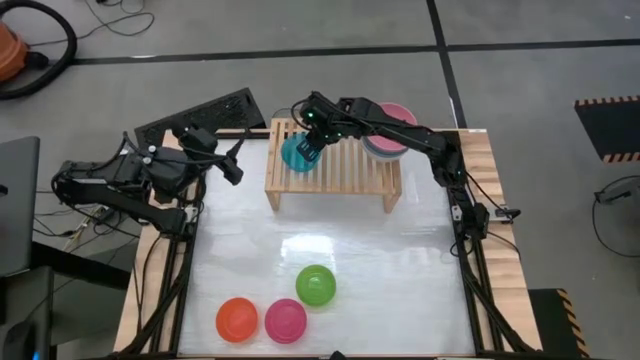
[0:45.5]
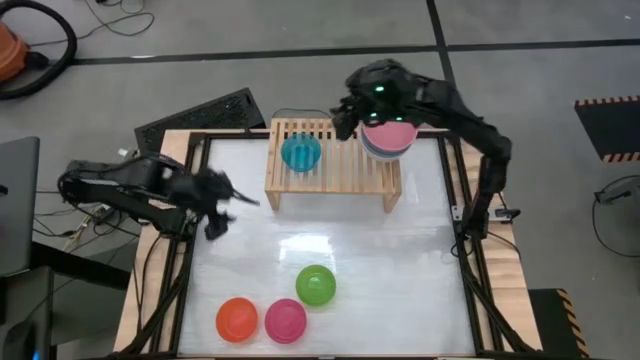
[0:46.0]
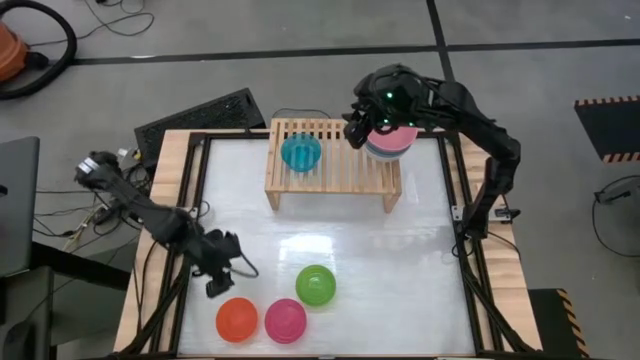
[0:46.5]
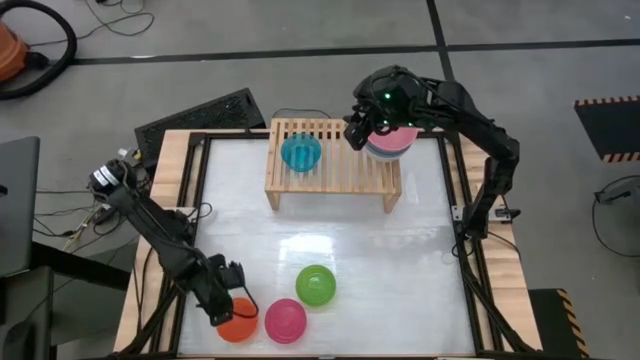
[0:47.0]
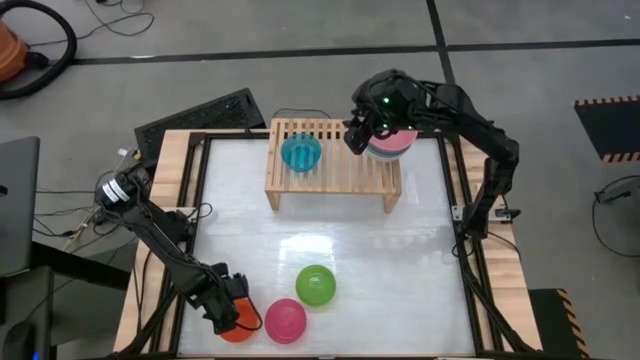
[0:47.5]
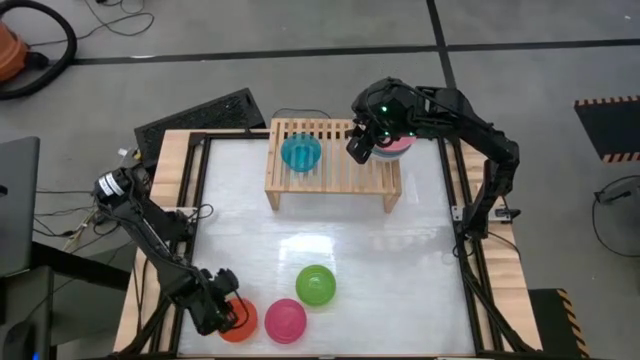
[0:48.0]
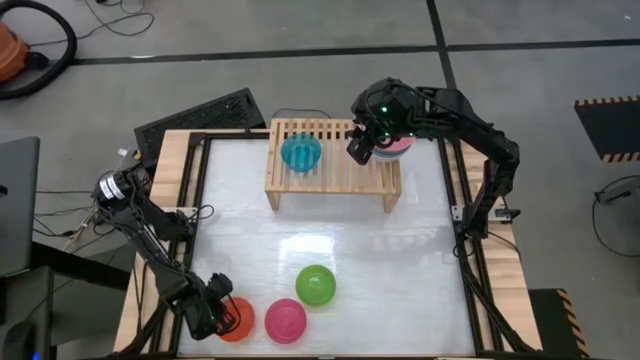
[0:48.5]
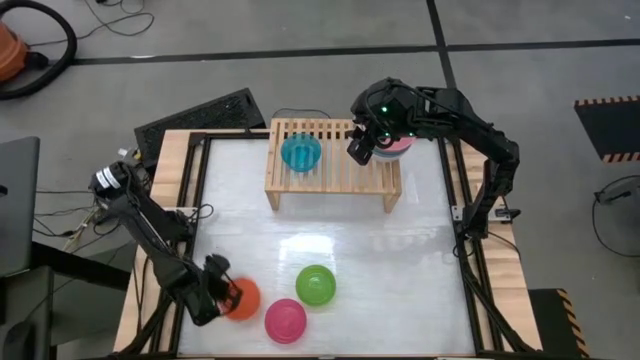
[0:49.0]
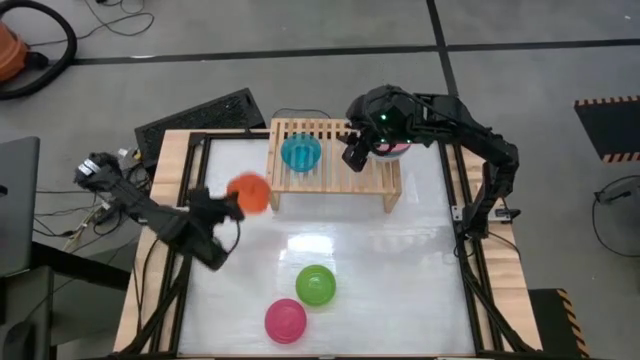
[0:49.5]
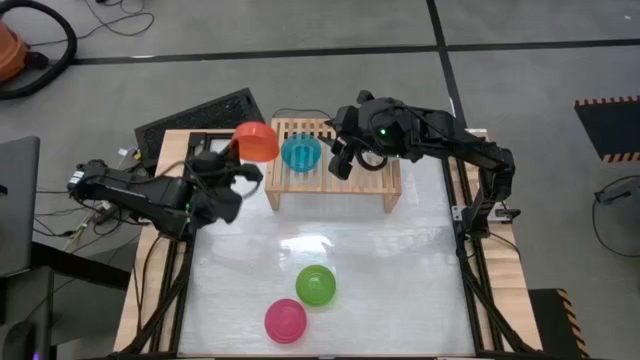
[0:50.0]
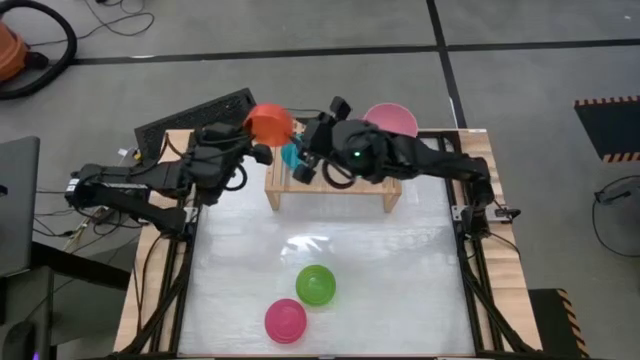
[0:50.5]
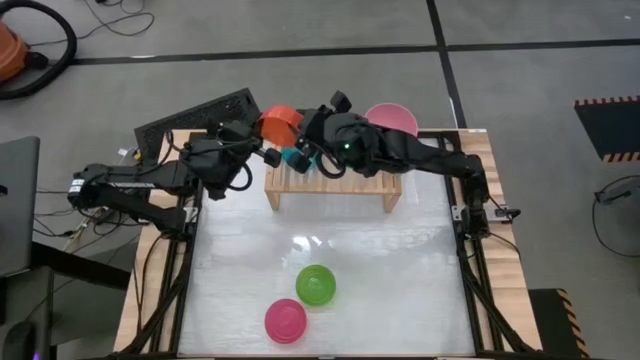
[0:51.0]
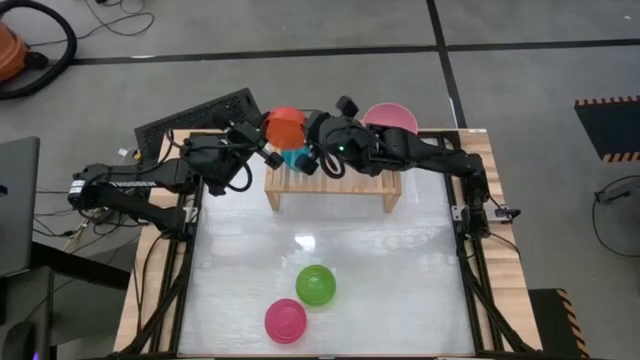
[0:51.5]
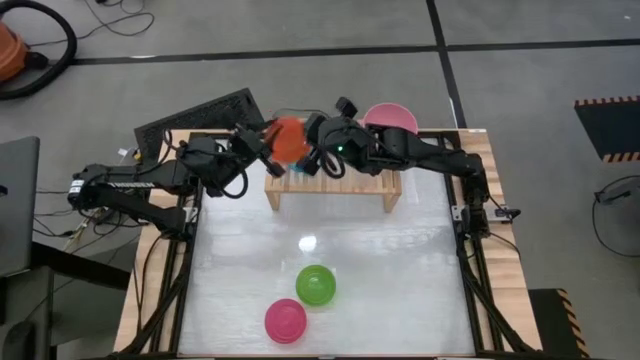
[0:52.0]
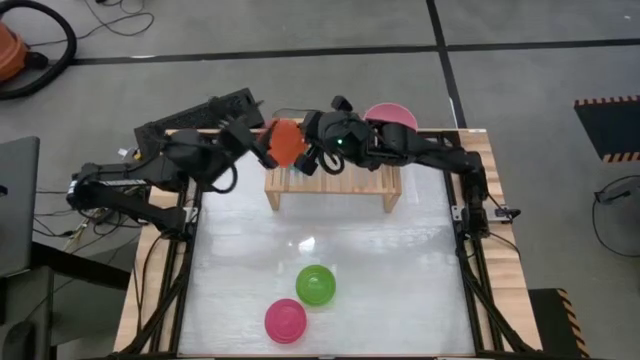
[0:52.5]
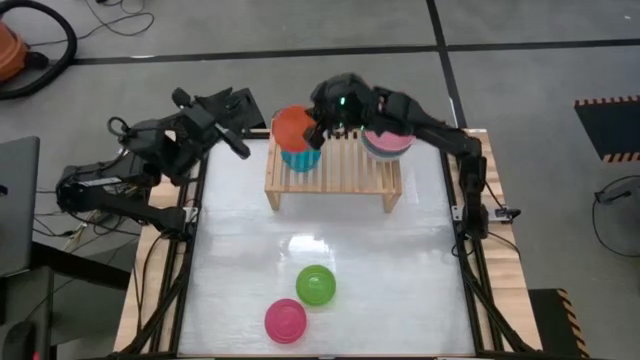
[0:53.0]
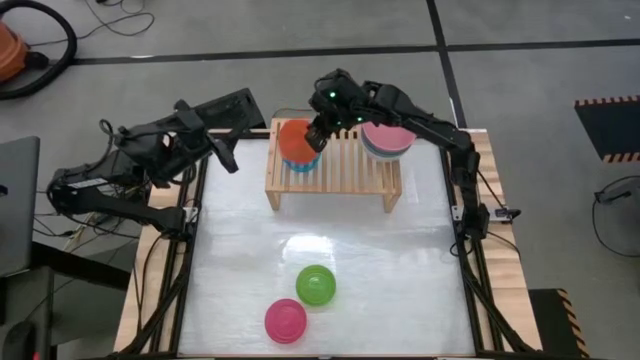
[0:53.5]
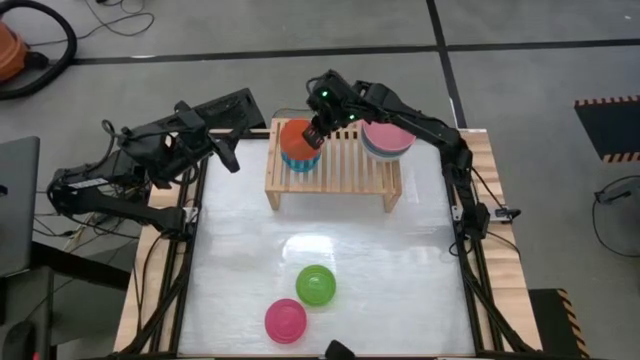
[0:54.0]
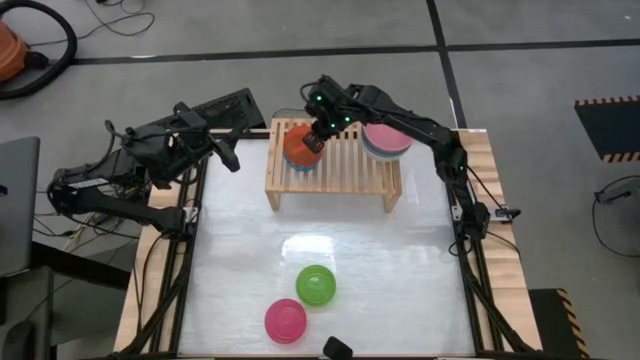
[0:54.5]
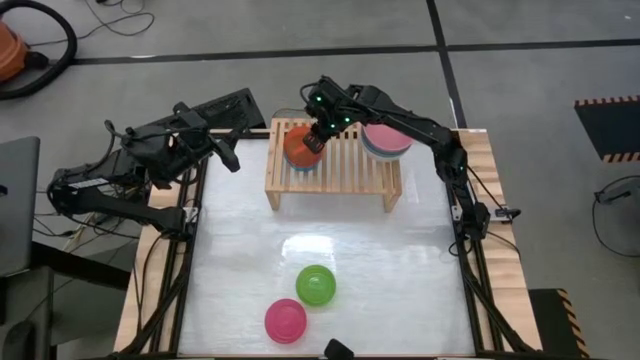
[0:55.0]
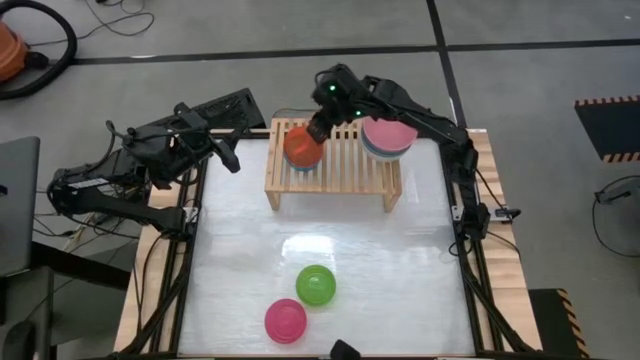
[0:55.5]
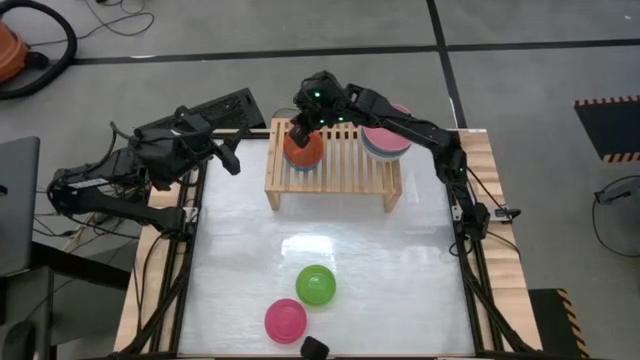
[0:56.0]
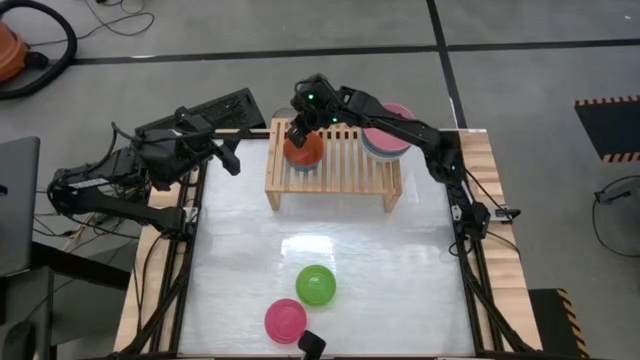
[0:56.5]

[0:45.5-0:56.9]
Task: Place and stack bowls onto a shelf
Stack the orange bowl on top of the light blue bowl on the shelf

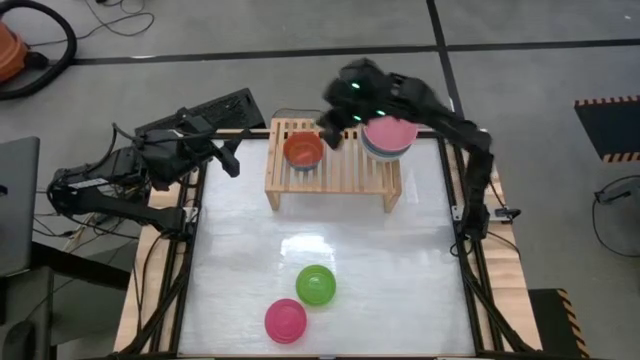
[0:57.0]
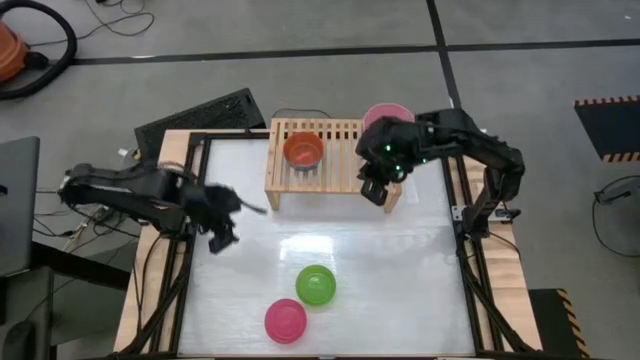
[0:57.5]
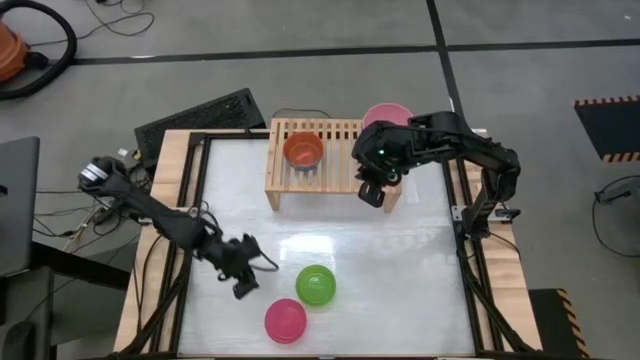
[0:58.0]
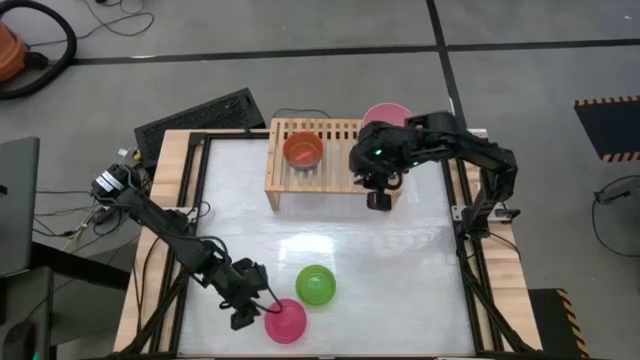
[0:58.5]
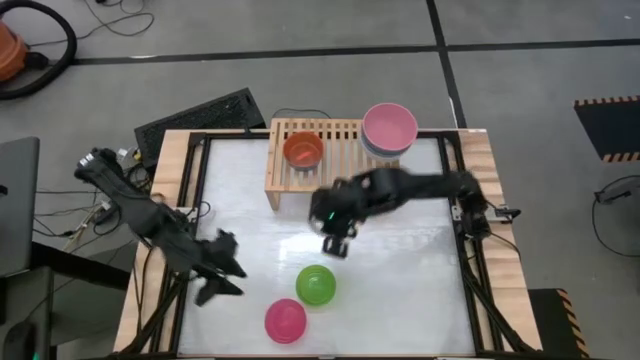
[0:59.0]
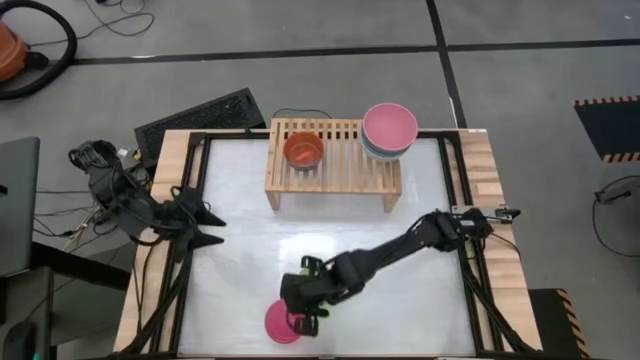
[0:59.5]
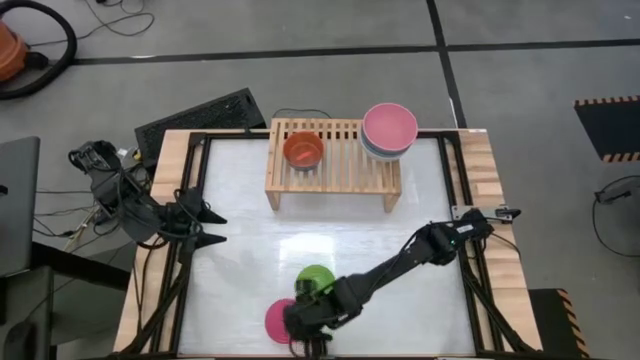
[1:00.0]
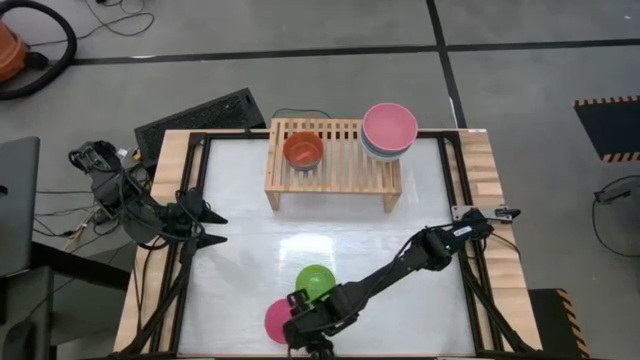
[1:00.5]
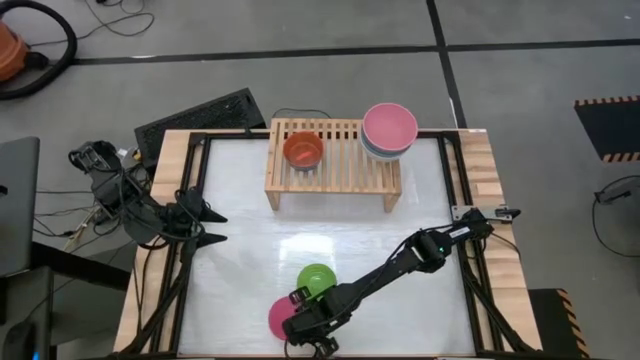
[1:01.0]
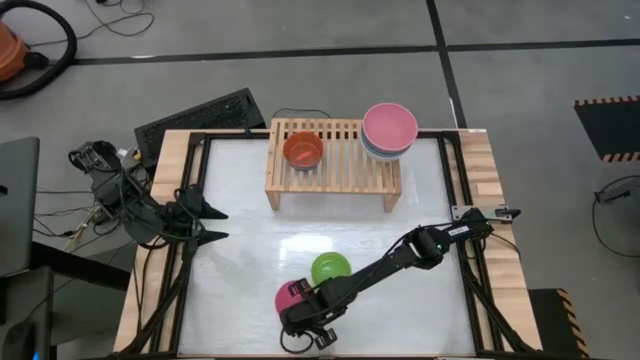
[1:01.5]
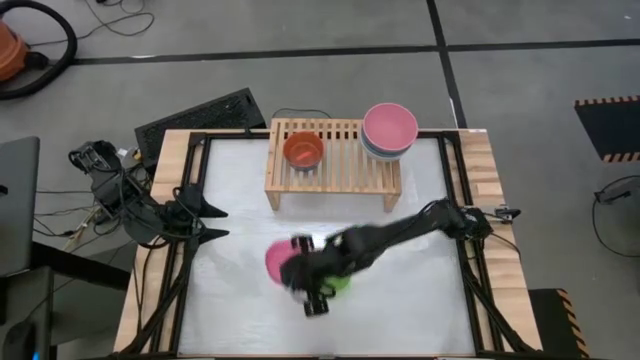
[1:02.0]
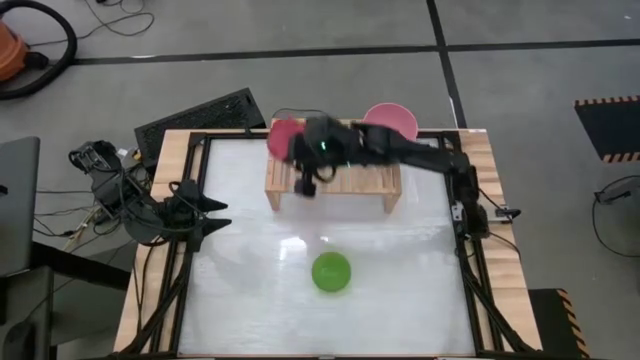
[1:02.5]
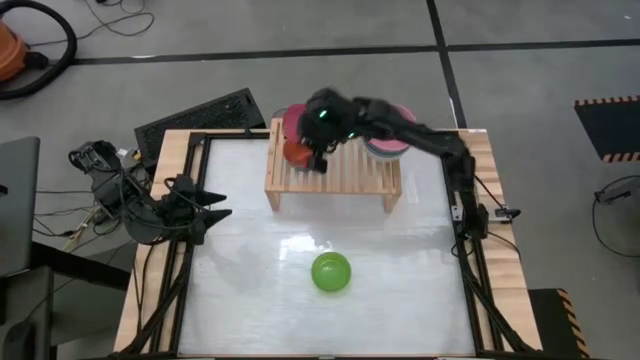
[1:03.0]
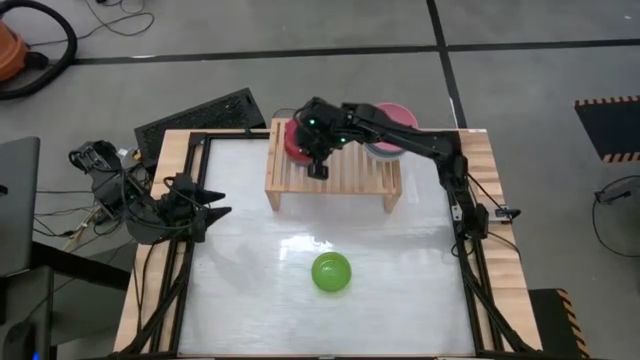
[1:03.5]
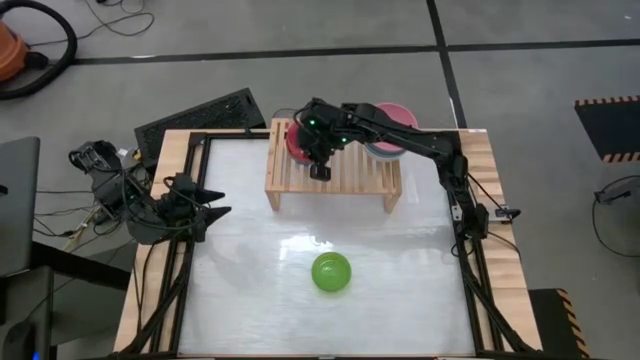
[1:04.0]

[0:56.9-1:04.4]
Stack the light pink bowl on top of the orange bowl on the shelf

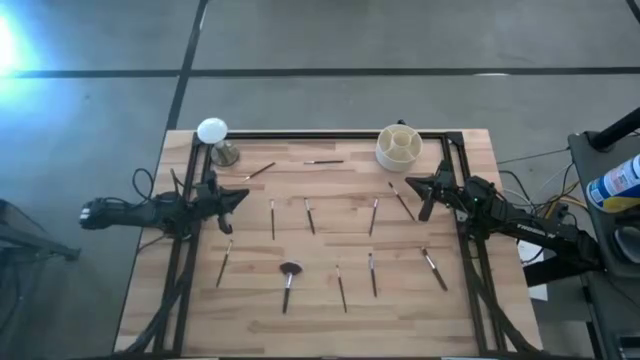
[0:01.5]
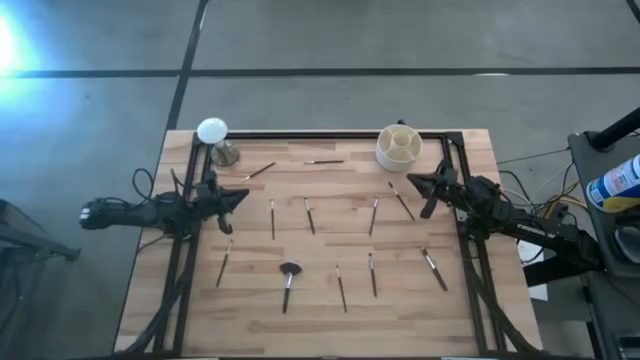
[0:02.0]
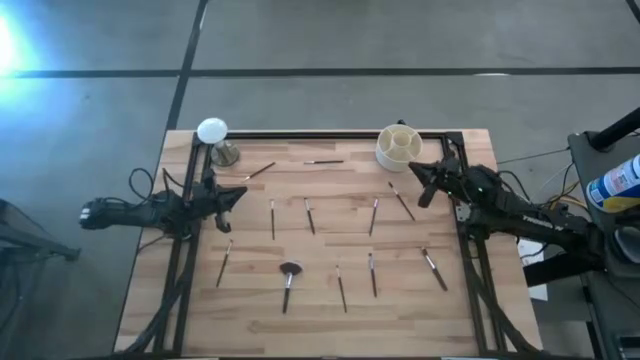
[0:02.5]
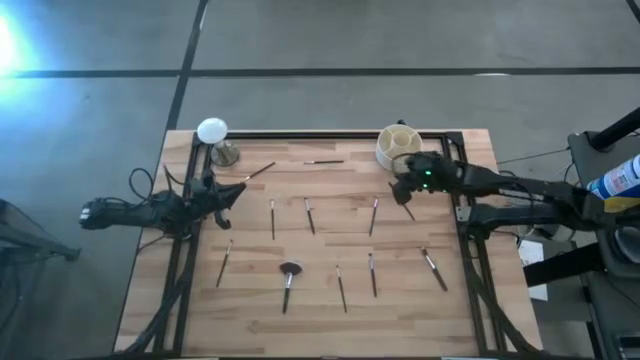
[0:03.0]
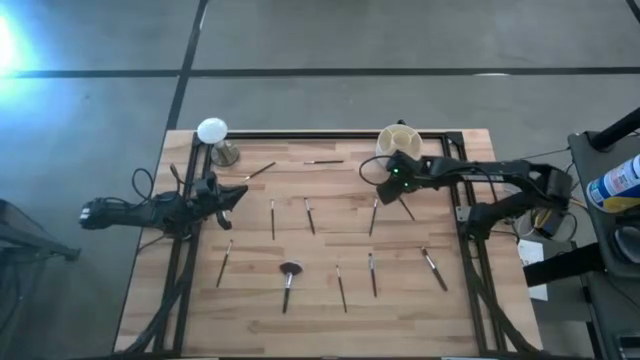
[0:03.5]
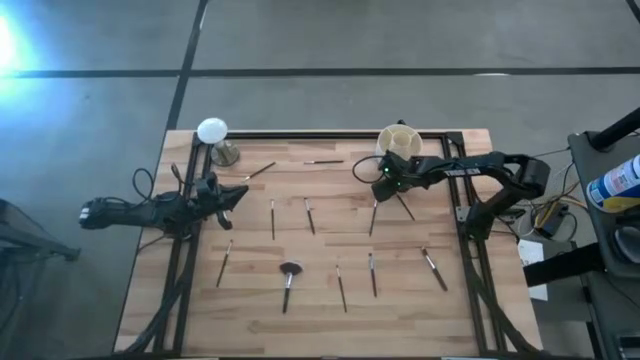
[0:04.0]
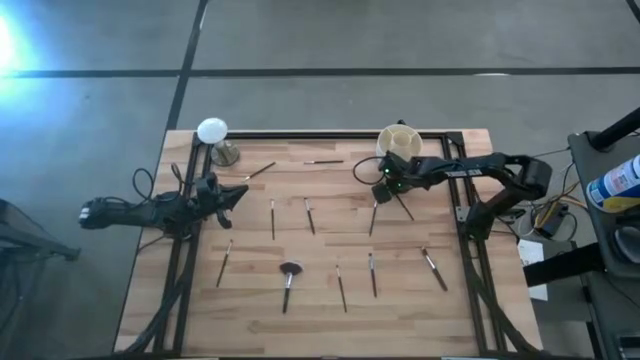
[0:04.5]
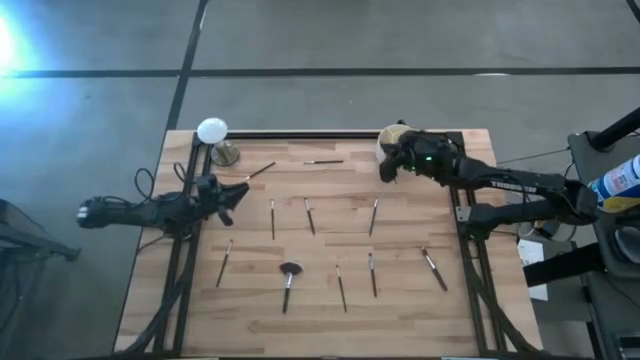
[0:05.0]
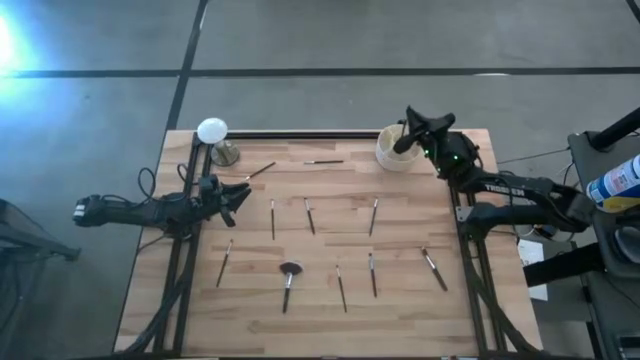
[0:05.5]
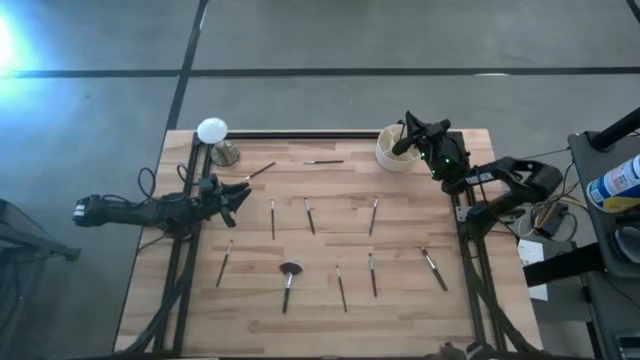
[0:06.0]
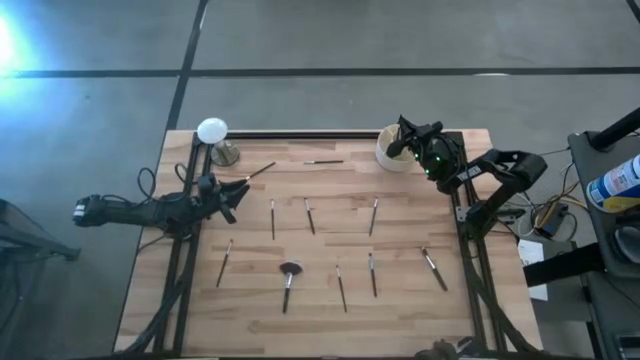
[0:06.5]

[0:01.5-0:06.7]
Task: Put items in baskets/containers
Put the black lash brush into the white pen organizer
